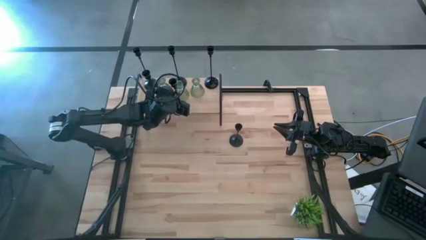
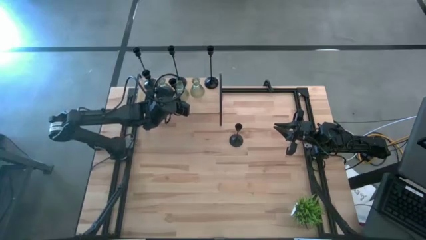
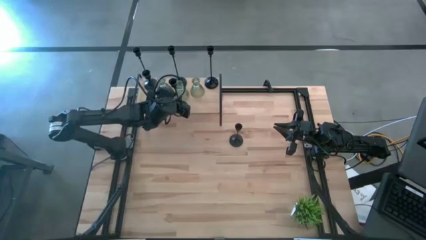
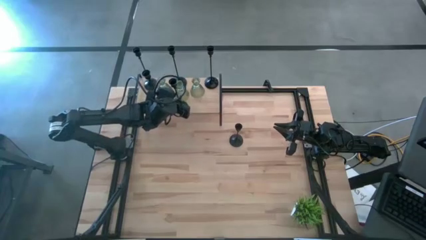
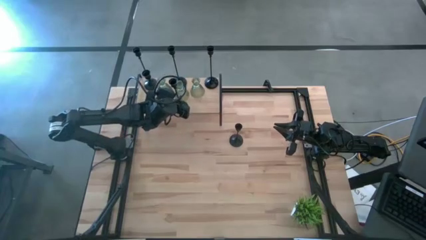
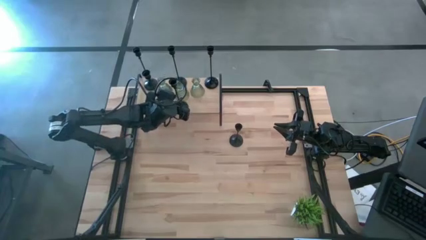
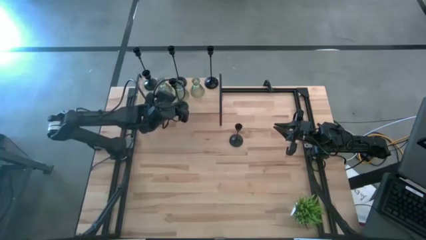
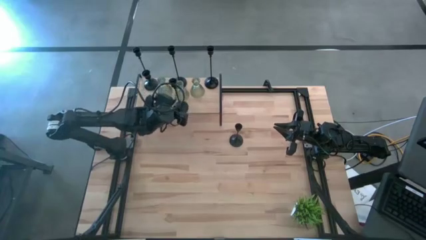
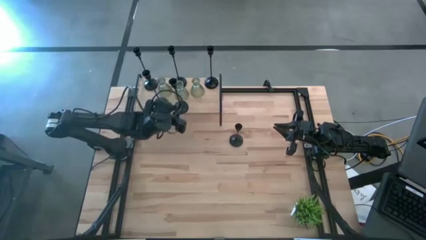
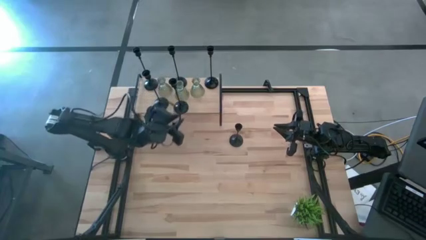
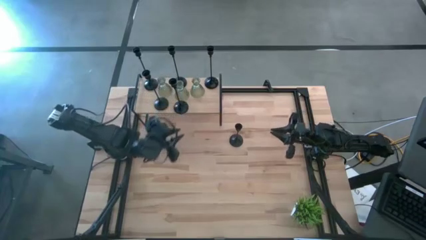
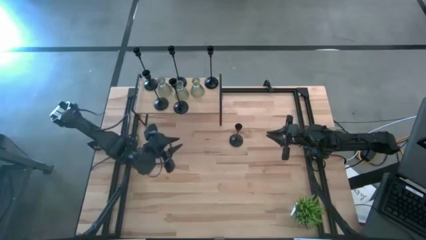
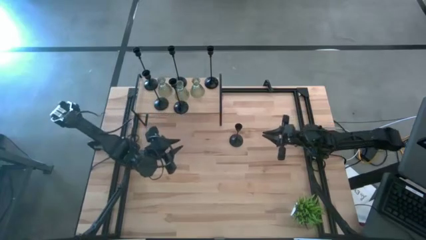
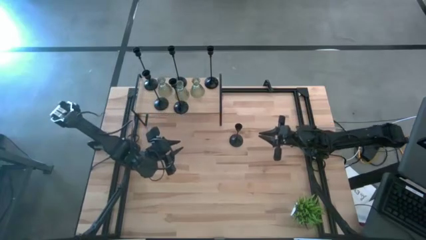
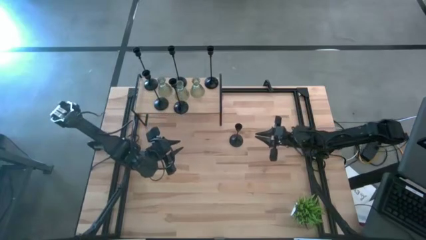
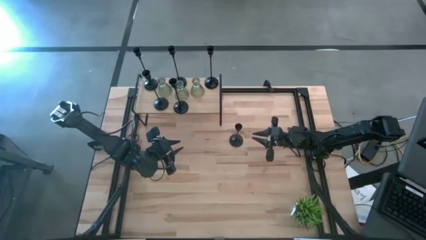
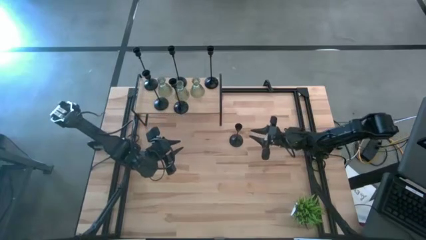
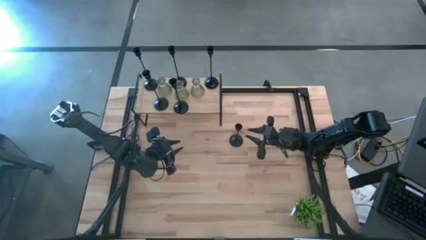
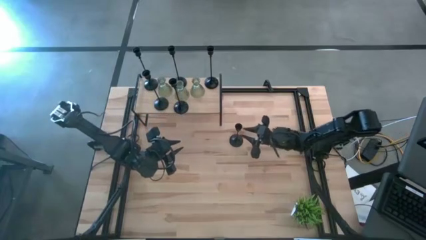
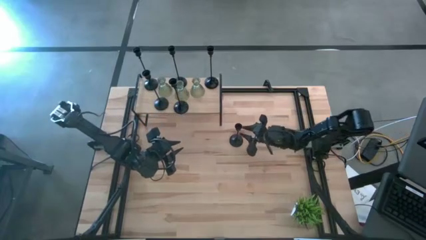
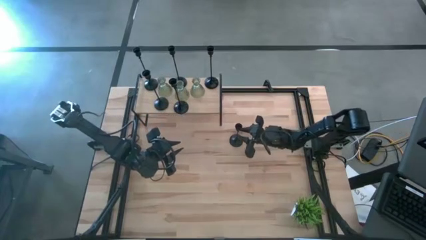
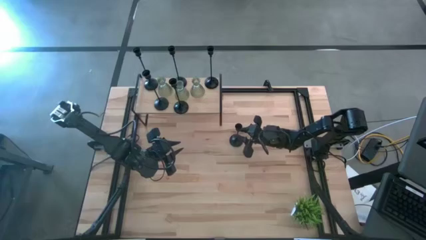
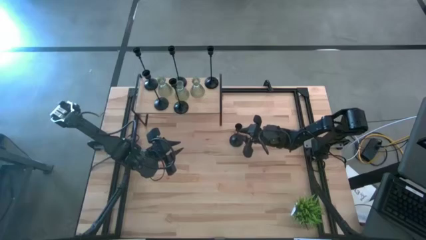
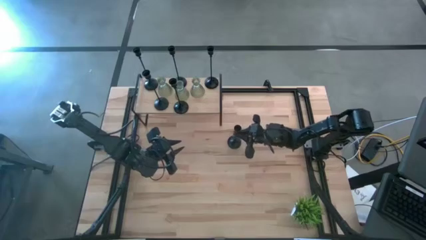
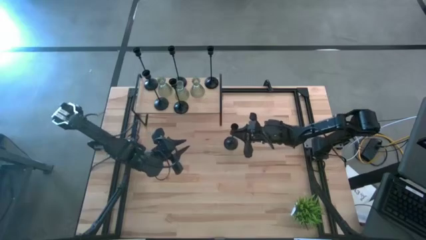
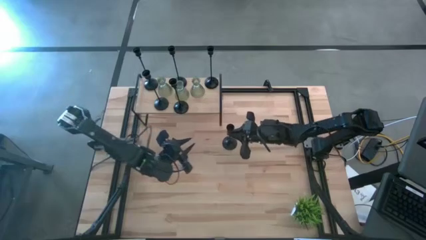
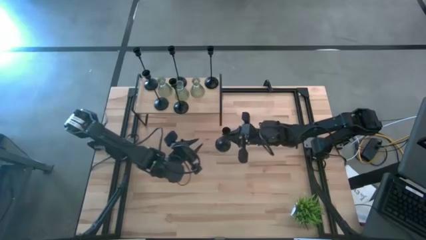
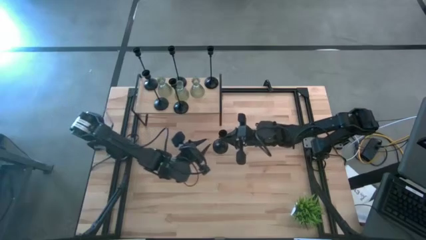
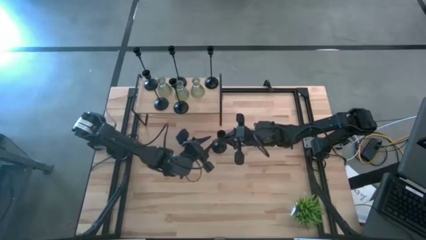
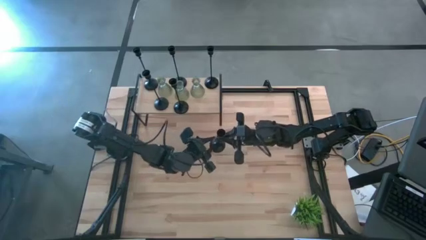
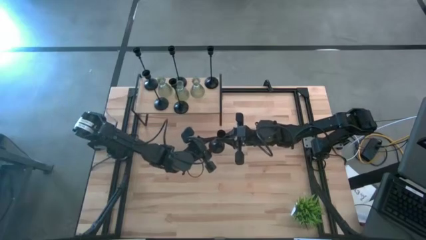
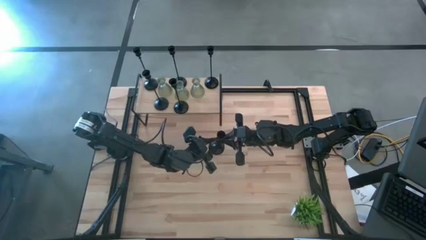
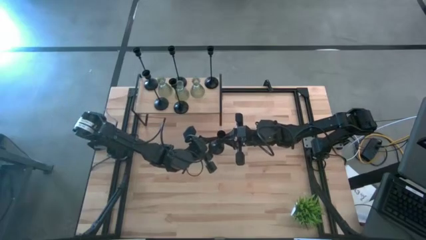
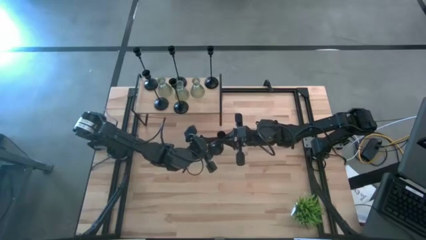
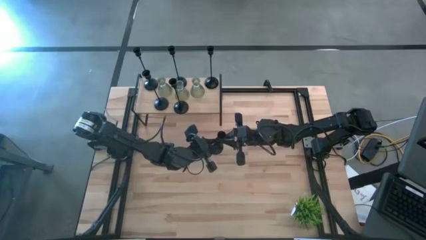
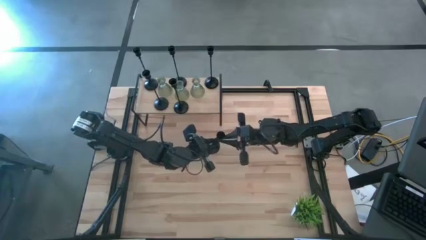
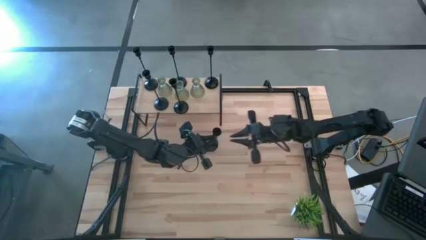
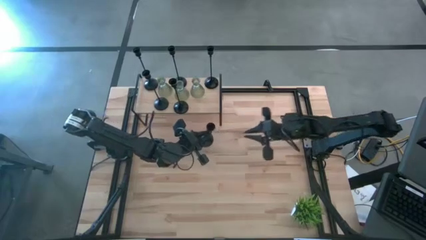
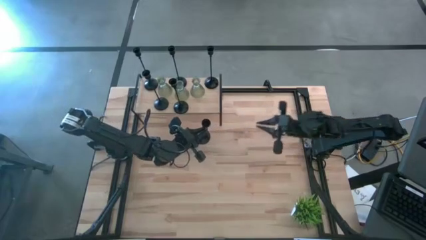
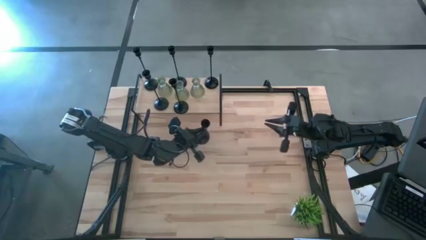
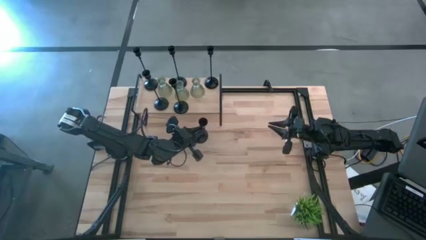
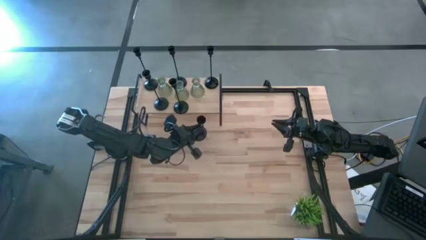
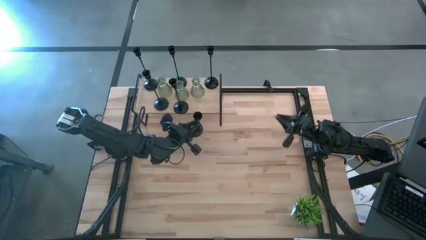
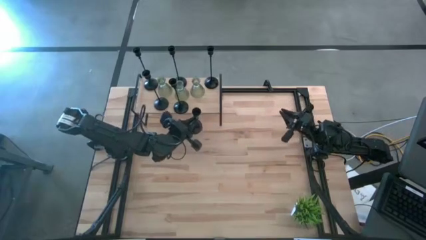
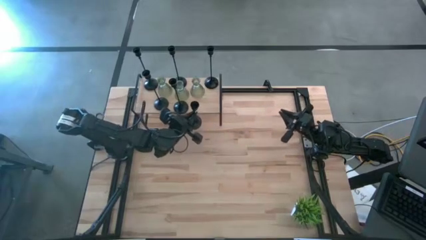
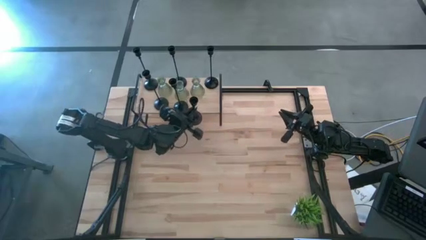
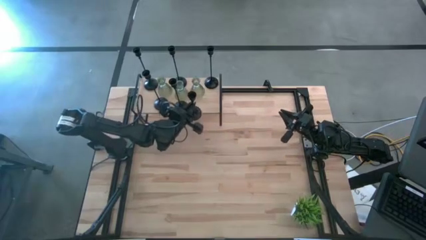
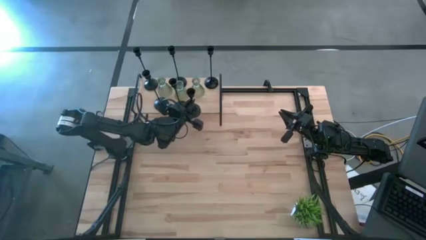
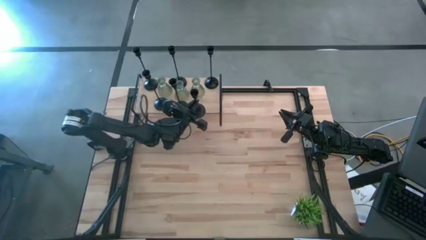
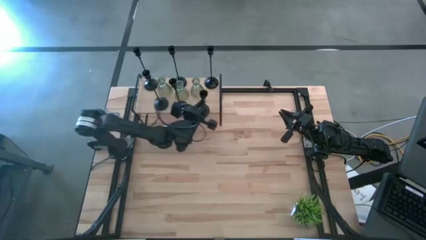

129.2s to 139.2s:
Task: Pick & Place candle stick holders
Put the small black candle holder on the shelf

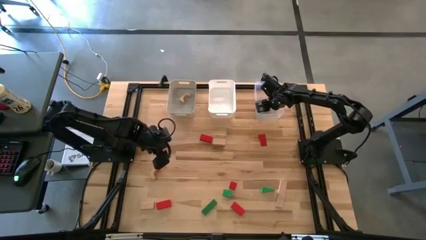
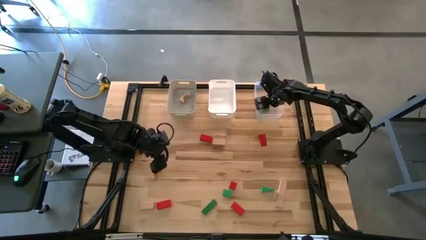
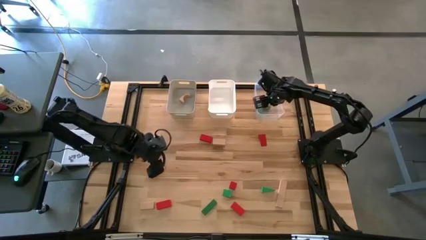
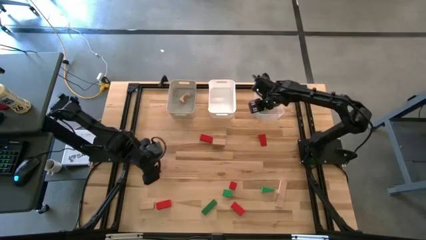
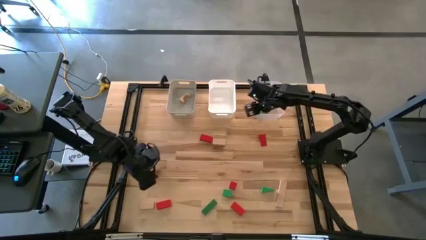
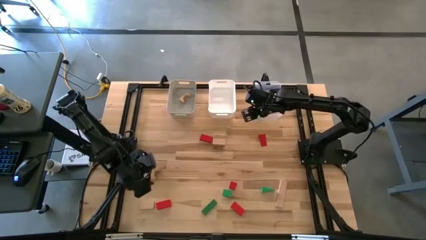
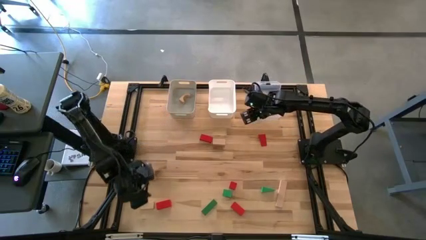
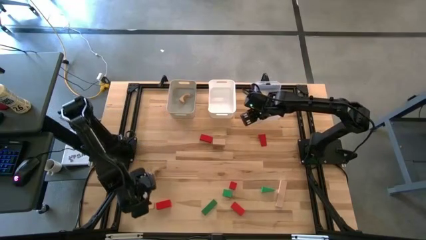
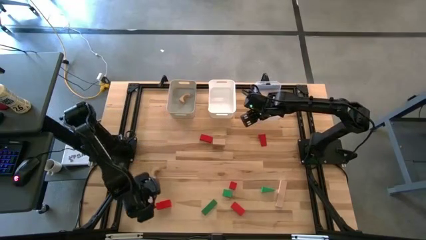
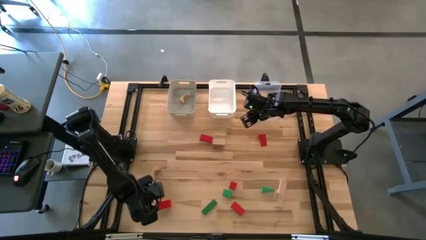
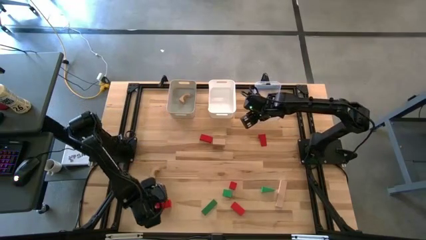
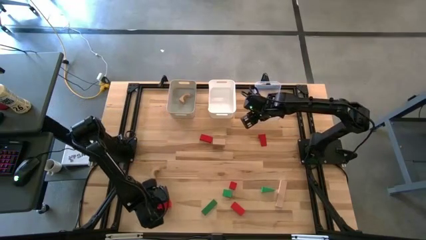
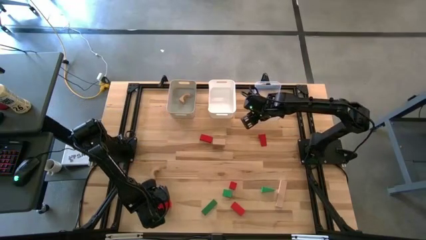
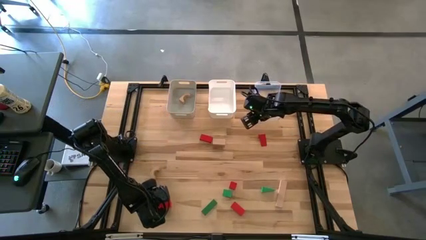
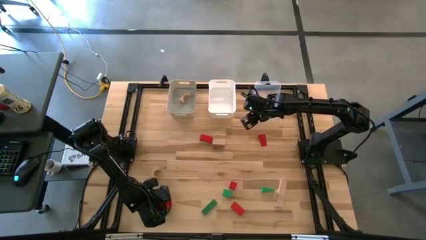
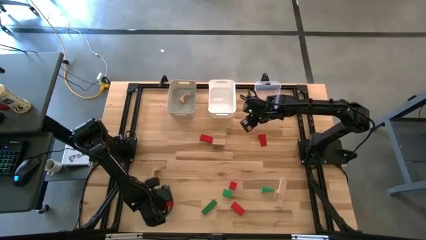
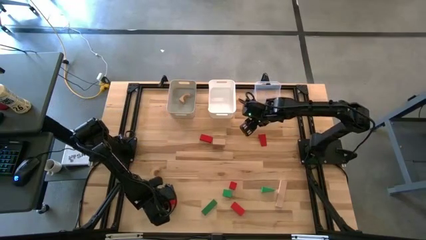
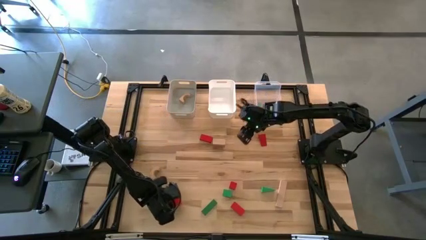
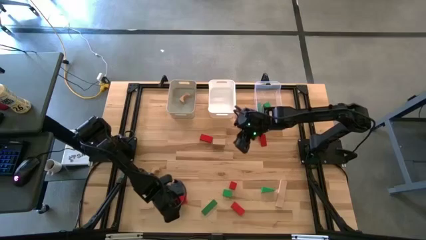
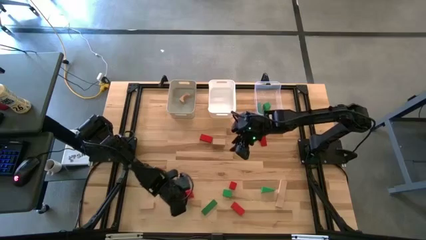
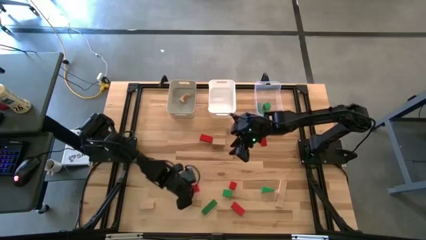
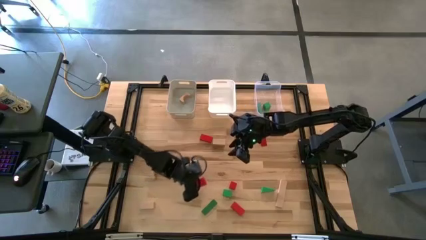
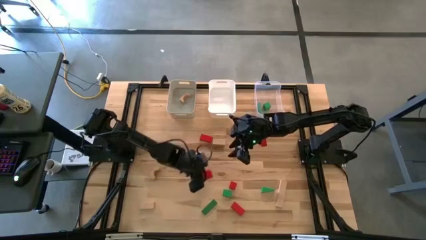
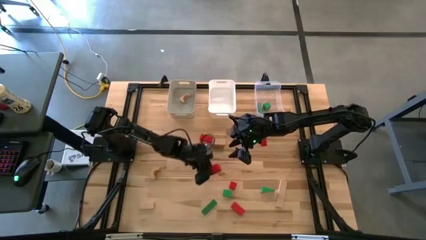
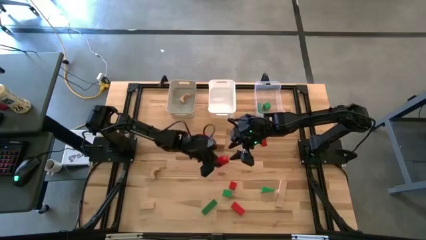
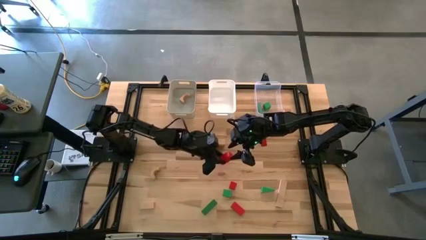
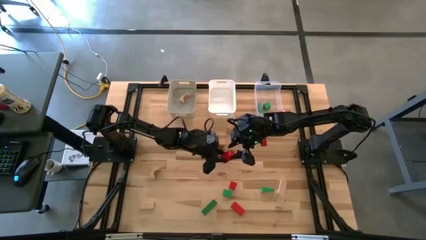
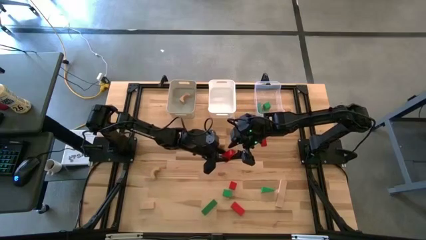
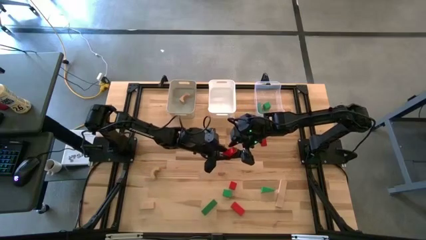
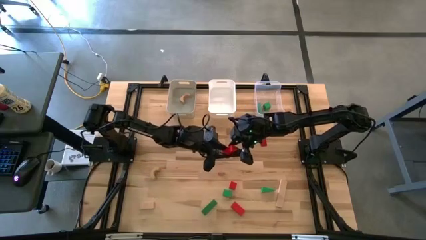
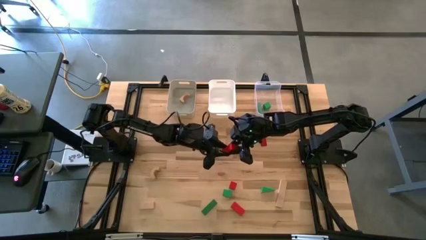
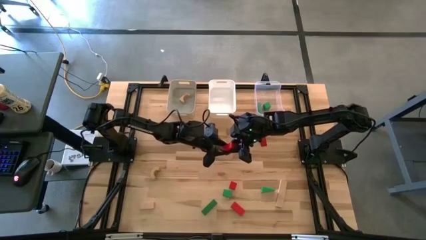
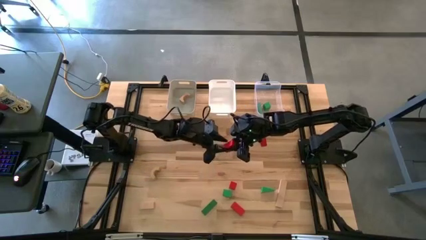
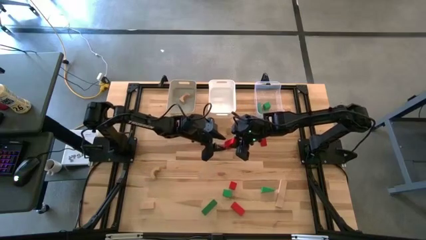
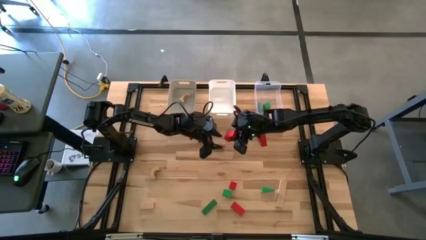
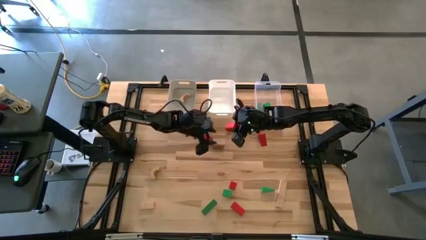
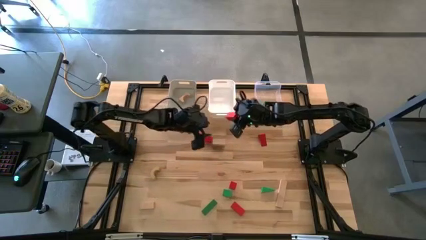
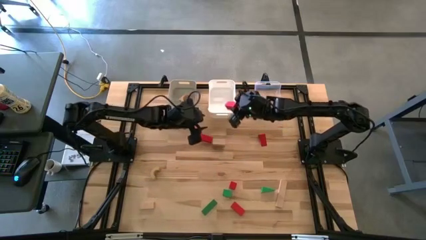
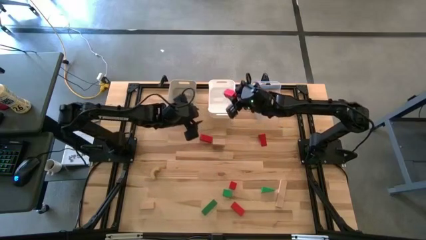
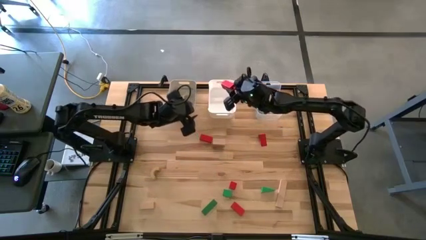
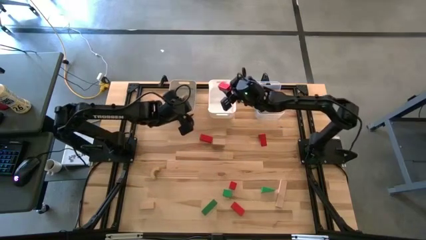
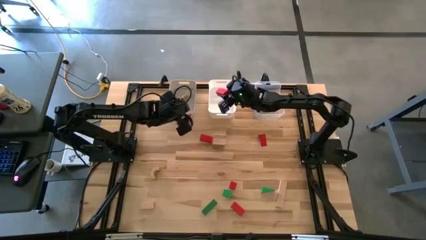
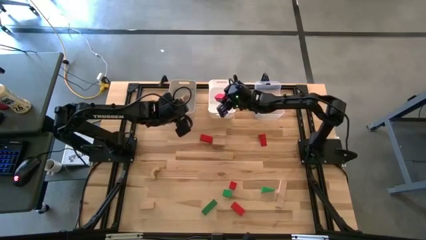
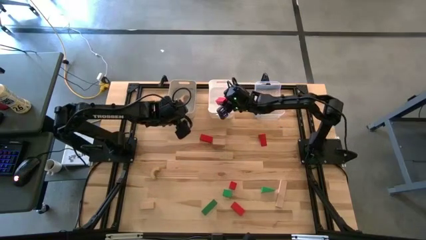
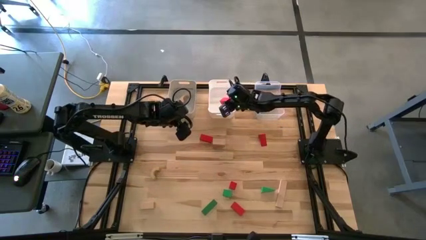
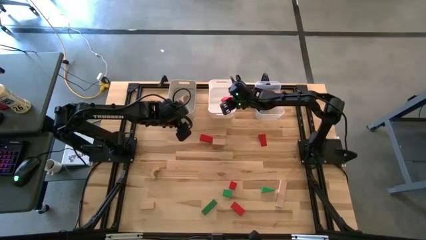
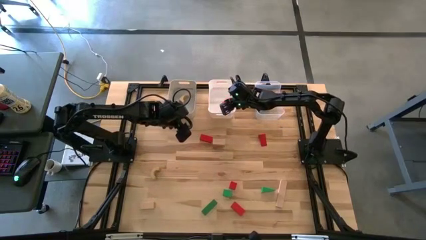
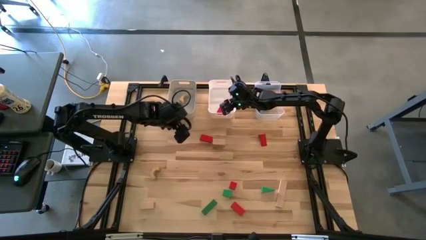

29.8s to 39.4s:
Task: Sort & place blocks by color
Put the red block into the white bin
